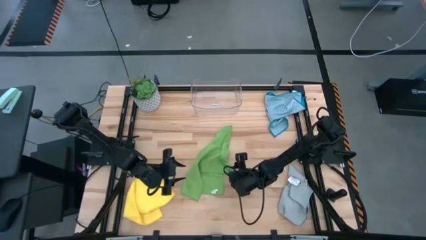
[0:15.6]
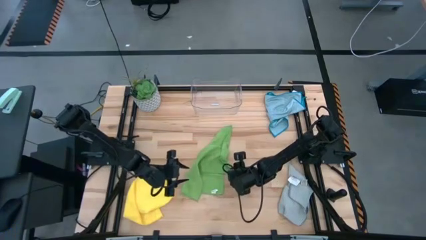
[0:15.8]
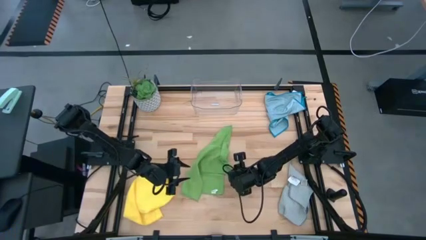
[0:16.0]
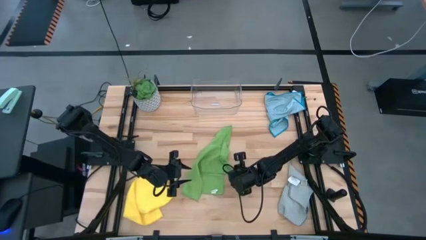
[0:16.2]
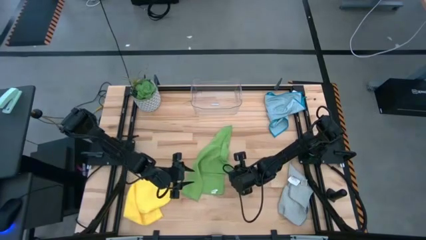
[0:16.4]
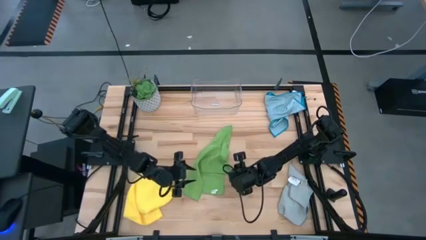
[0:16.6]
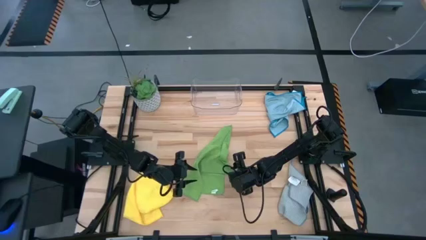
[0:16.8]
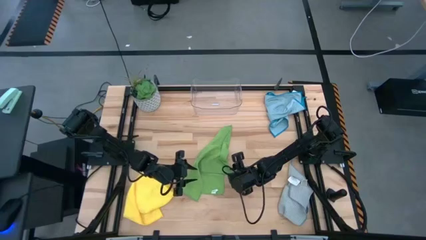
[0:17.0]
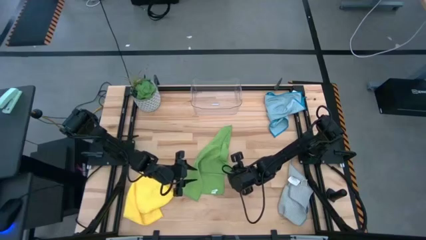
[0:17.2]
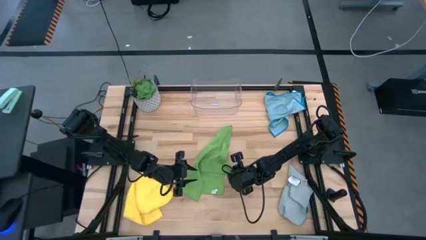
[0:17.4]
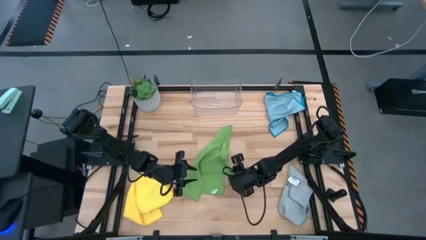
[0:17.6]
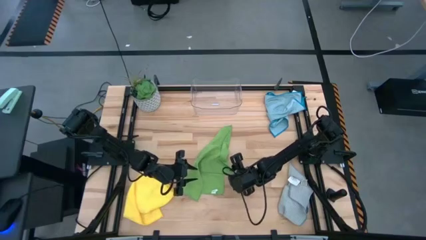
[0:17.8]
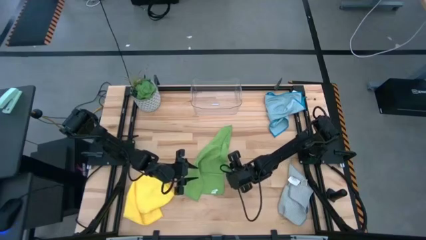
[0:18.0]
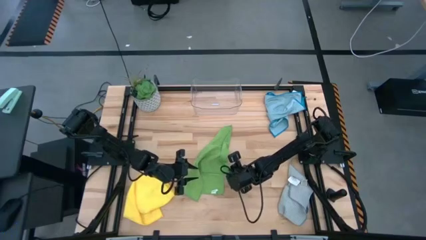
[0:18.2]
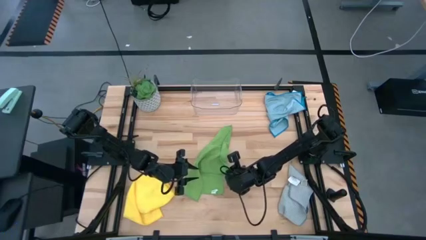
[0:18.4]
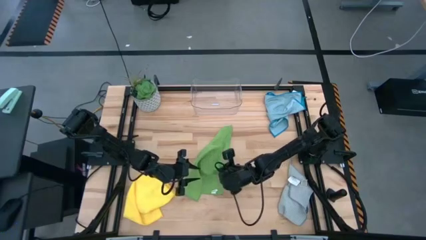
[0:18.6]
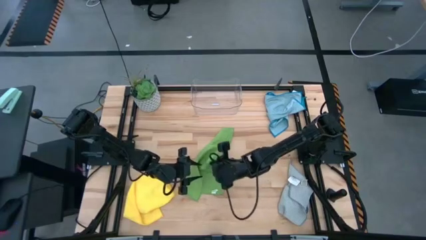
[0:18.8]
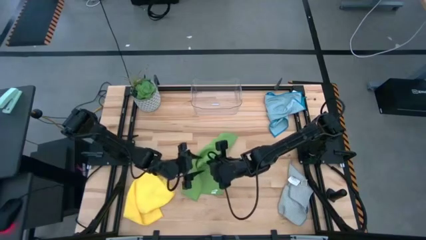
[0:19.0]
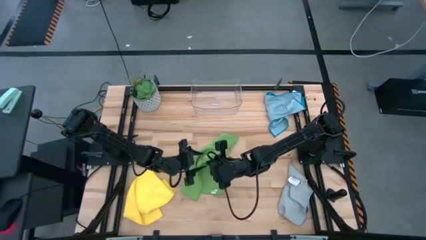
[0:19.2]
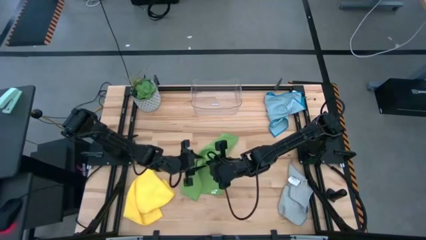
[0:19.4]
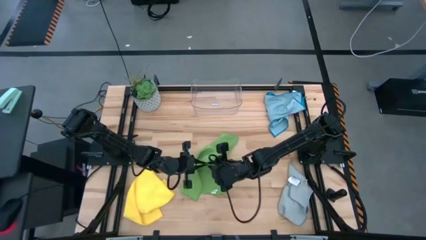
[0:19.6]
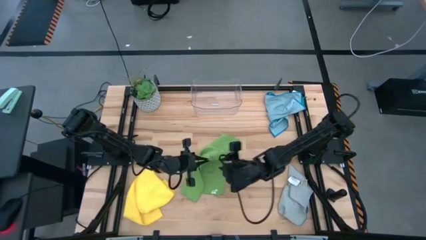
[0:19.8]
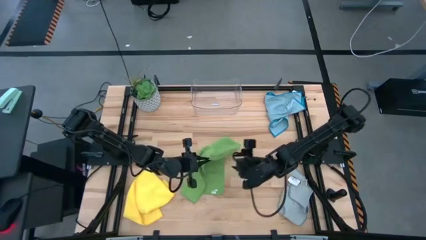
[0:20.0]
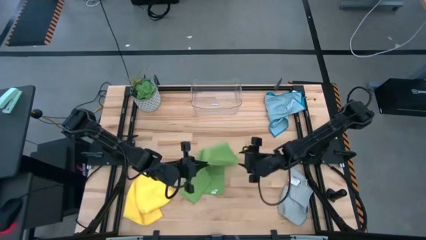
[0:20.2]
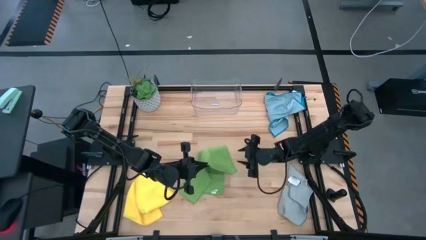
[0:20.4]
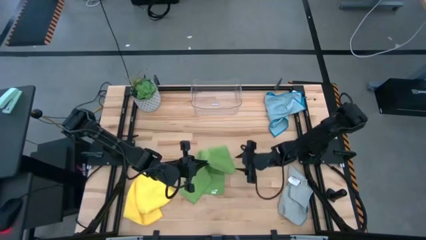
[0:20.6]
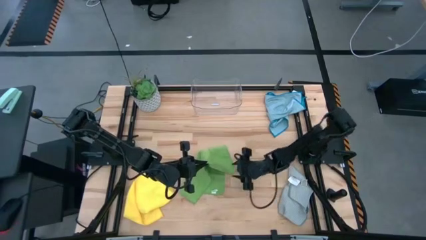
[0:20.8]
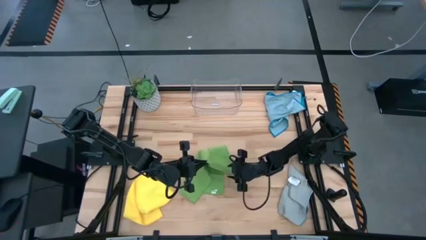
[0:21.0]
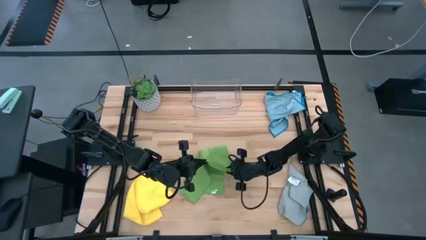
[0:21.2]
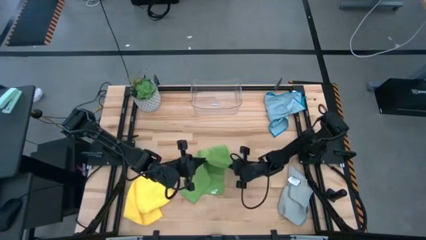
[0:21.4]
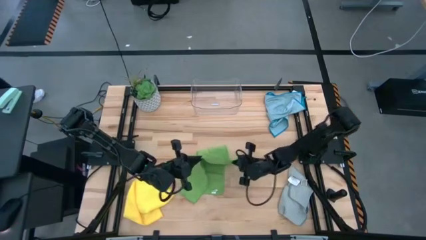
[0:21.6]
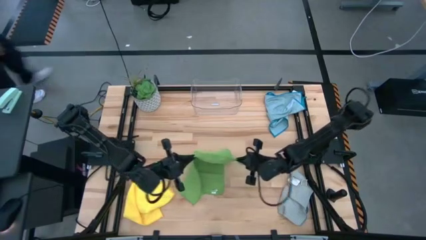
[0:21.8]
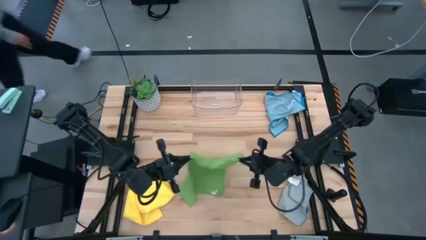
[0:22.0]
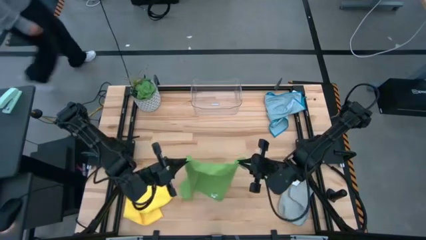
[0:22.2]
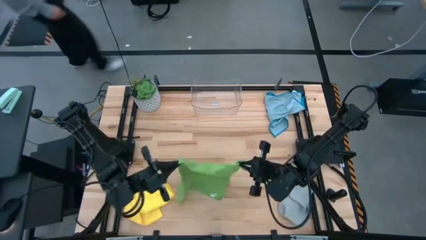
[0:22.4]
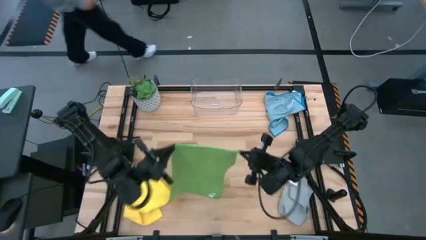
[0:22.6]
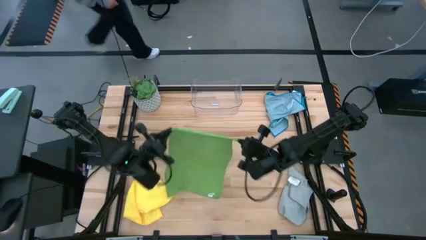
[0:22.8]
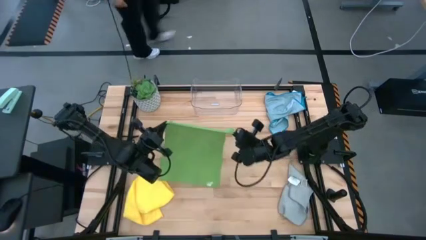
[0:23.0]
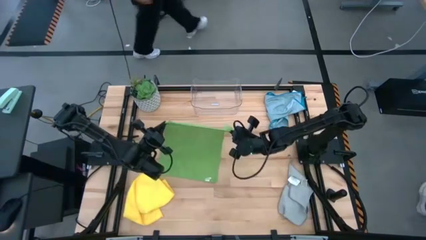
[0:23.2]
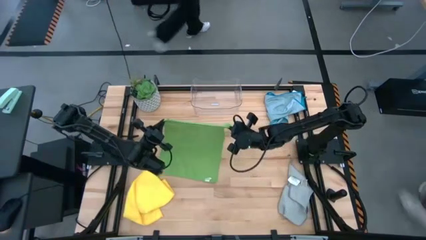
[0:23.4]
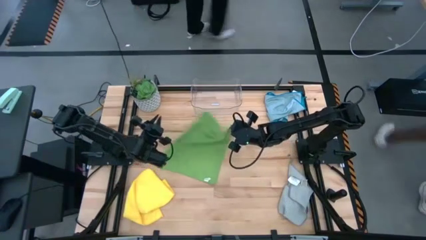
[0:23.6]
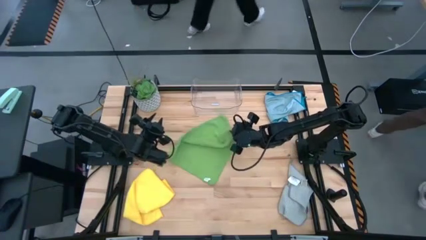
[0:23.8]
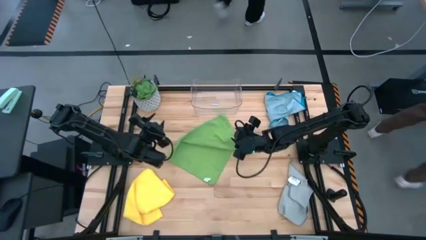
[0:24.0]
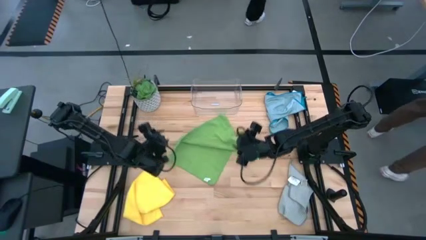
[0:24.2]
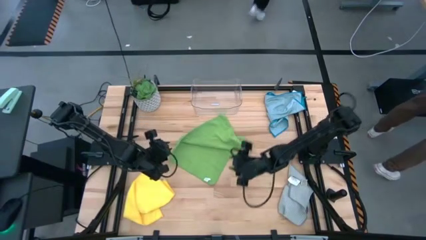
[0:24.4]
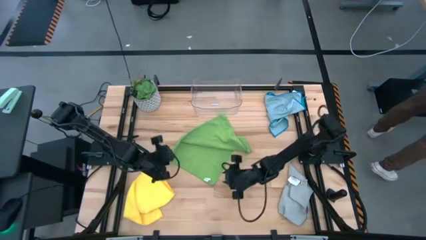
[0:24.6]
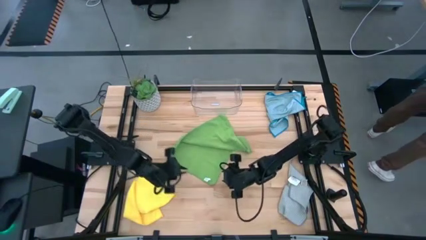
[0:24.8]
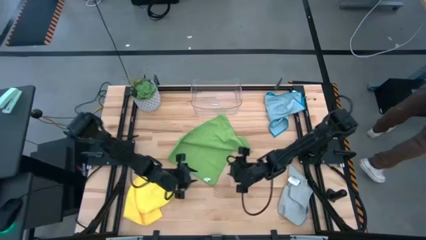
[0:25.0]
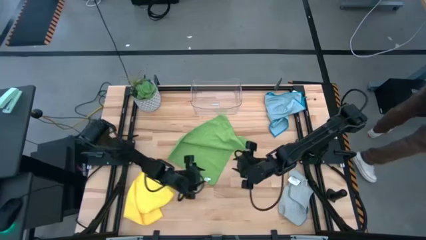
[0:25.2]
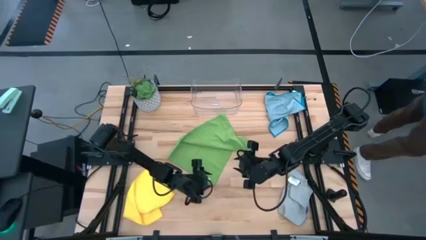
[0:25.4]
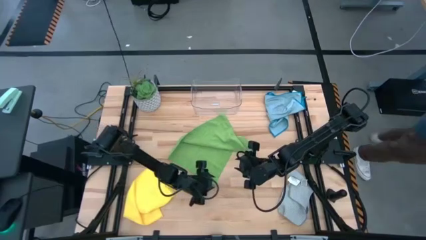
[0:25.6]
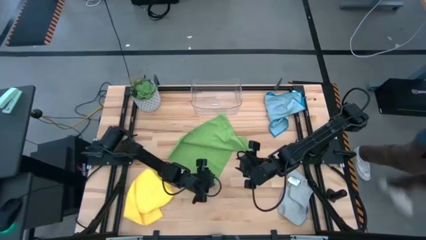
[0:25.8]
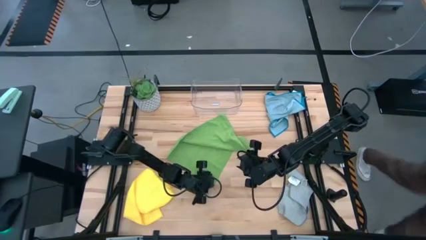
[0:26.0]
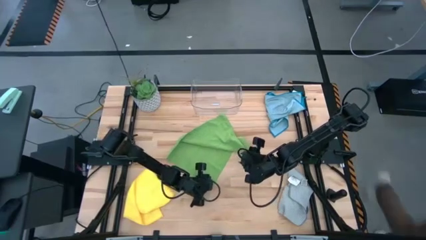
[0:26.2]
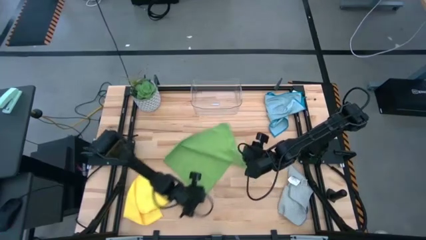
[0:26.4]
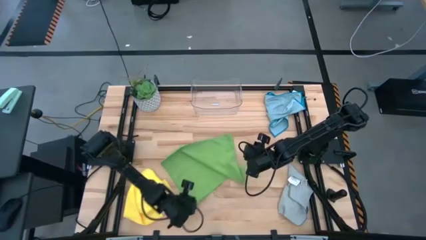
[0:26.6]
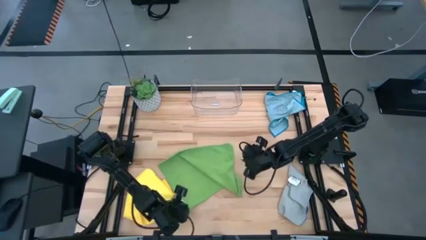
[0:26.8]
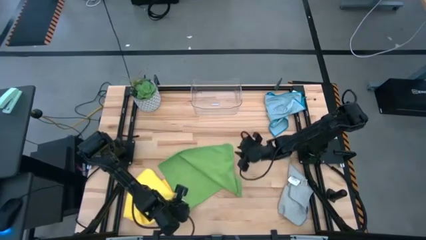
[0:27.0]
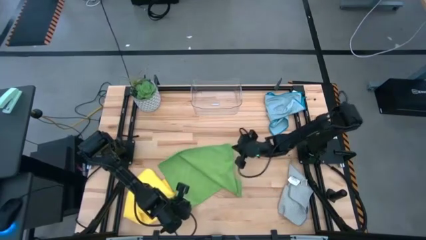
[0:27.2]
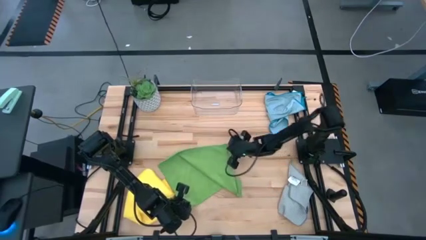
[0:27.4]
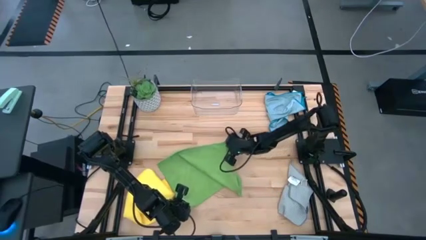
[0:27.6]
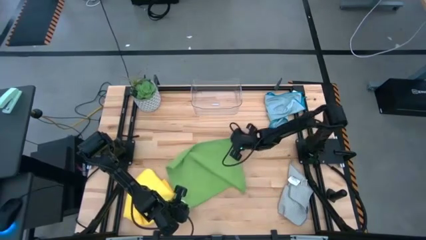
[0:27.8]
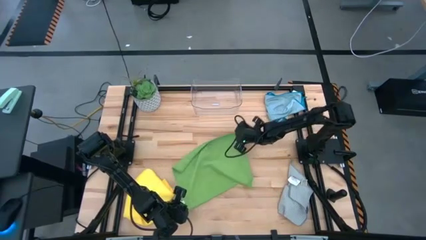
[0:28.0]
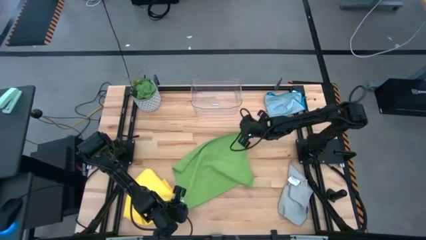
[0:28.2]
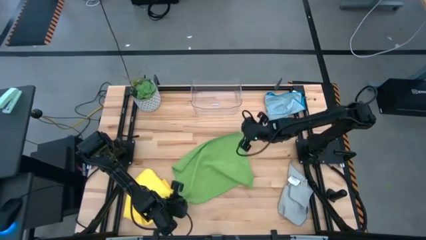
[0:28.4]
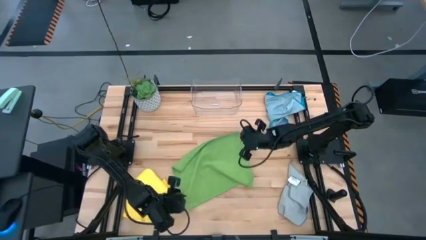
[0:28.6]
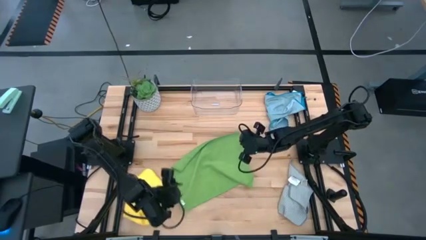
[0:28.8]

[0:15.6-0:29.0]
Task: Fold microfiber towels
Fold the green microfiber cloth

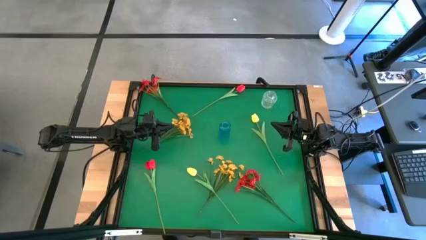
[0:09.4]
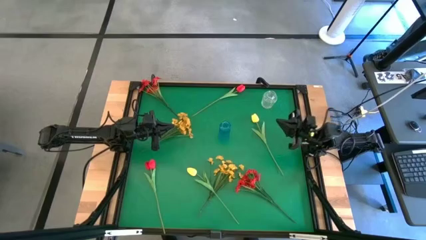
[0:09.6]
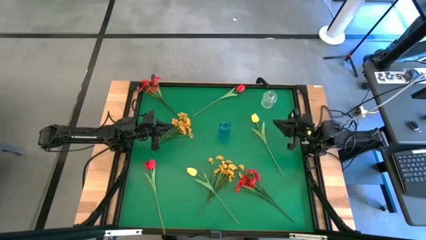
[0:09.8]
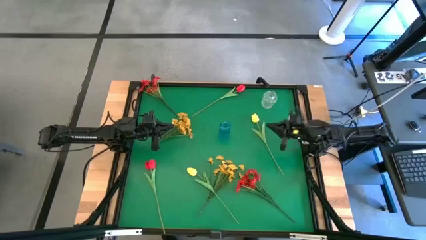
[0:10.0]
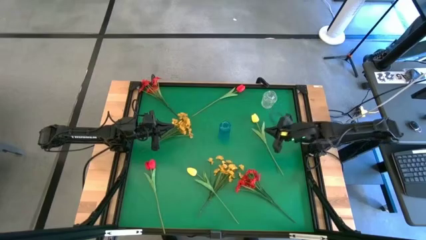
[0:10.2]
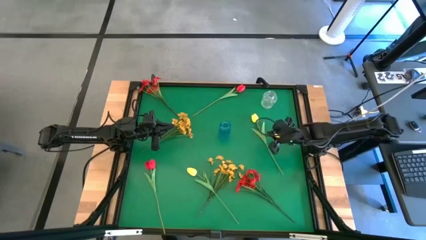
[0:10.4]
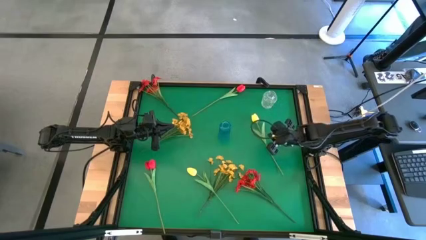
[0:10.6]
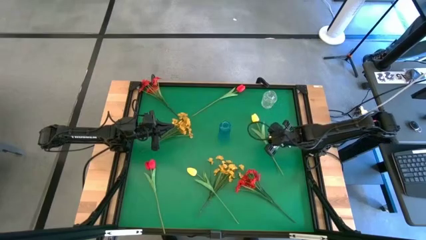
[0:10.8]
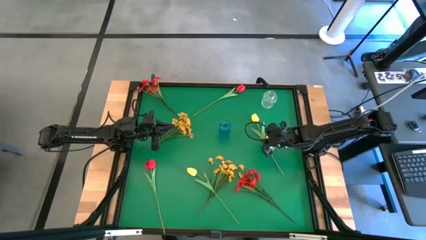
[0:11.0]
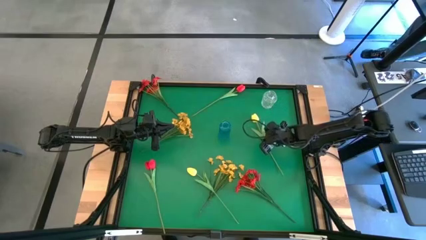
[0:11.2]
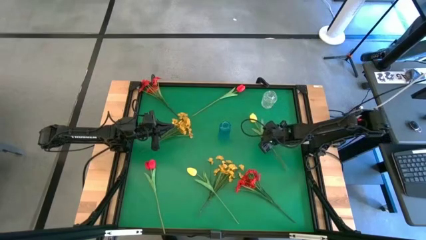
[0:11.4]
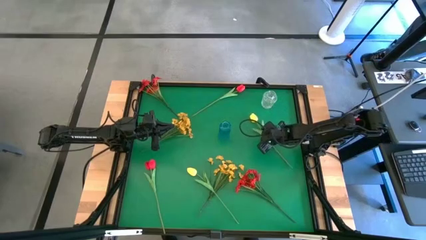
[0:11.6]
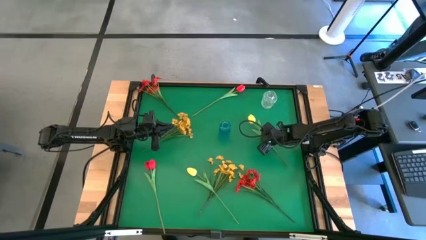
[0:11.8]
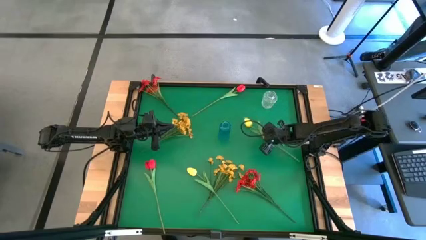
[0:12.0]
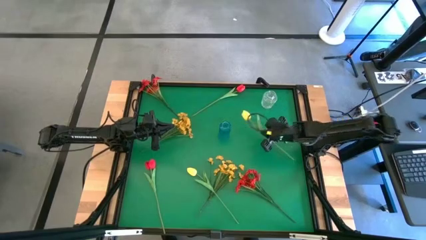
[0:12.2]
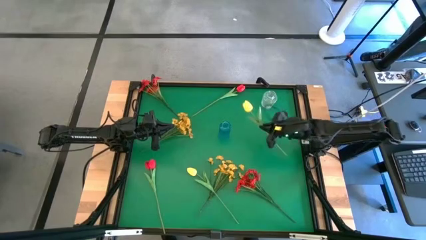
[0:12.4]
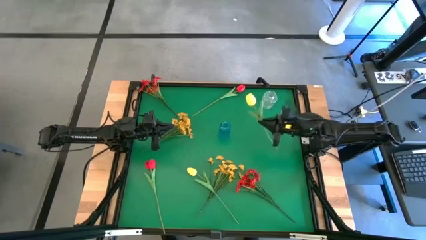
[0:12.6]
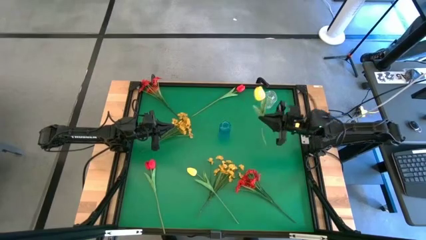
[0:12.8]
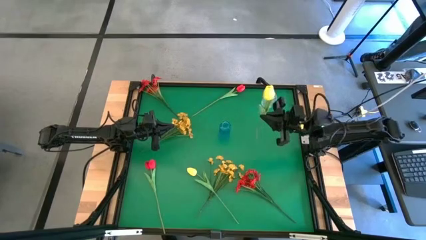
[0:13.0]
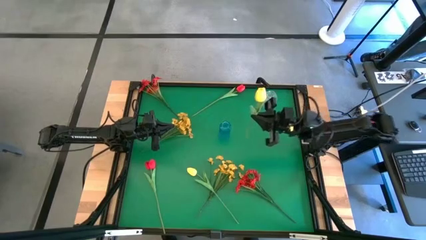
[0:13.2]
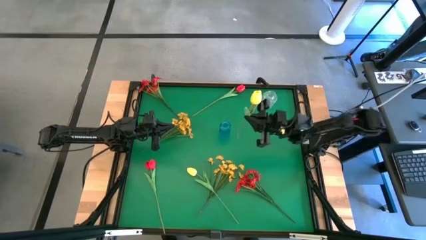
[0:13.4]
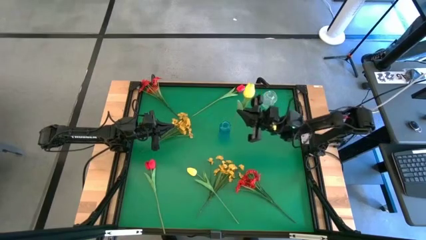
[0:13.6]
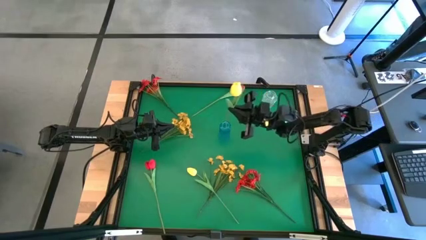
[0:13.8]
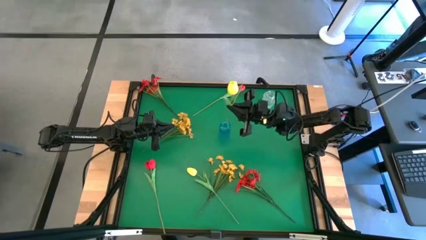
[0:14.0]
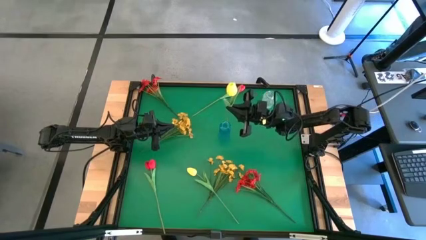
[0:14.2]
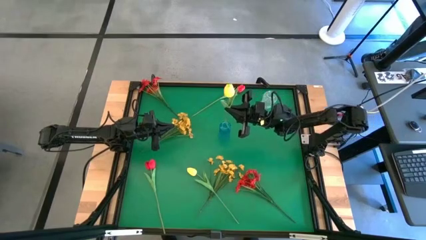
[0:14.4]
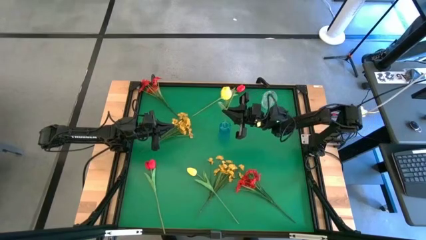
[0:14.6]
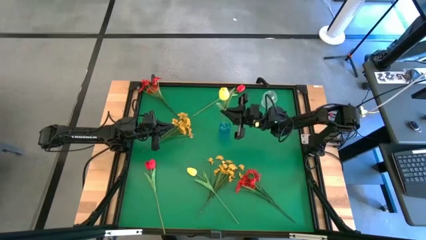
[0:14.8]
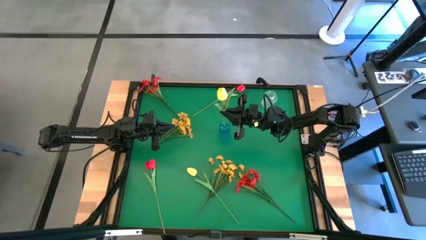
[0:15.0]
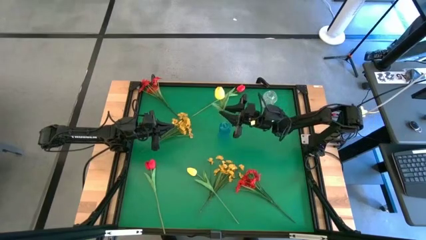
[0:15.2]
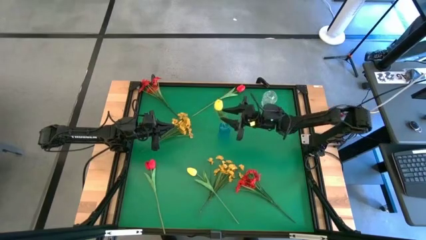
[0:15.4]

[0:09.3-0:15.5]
Task: Sort flowers into vase by color
Put the top yellow flower into the blue crystal vase
